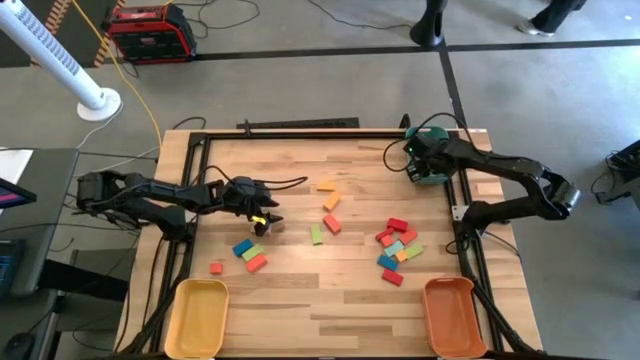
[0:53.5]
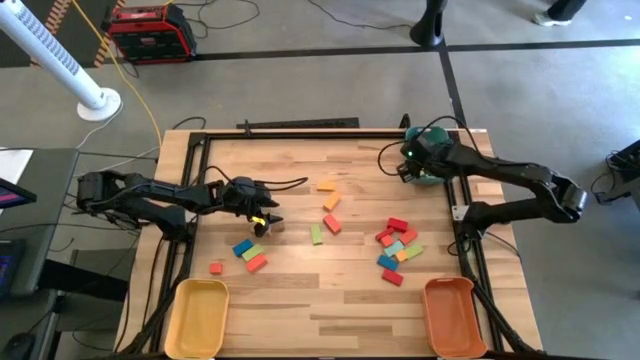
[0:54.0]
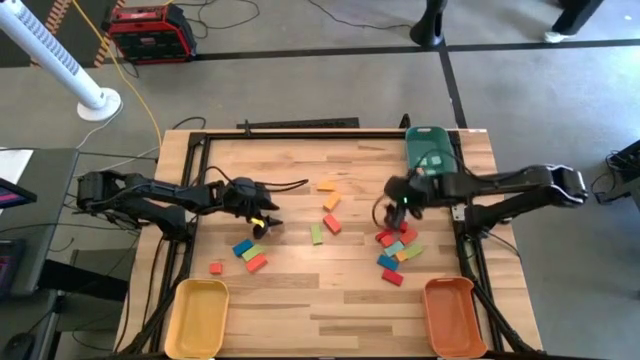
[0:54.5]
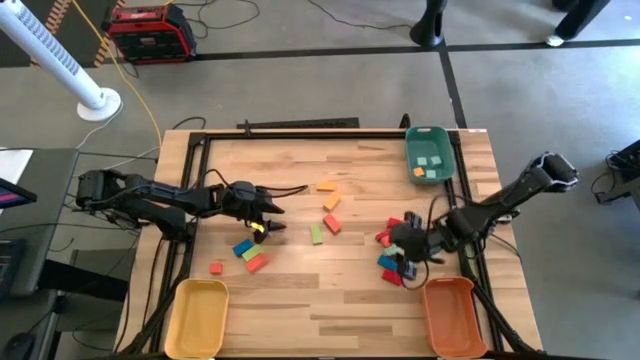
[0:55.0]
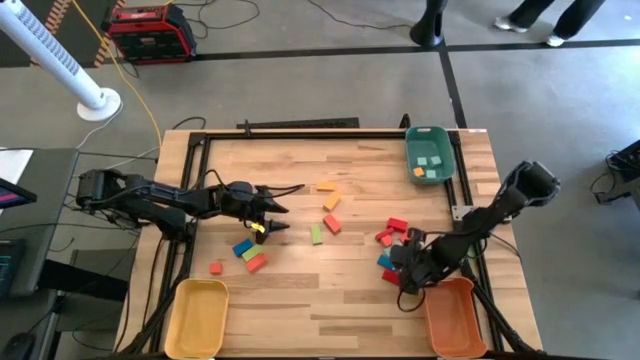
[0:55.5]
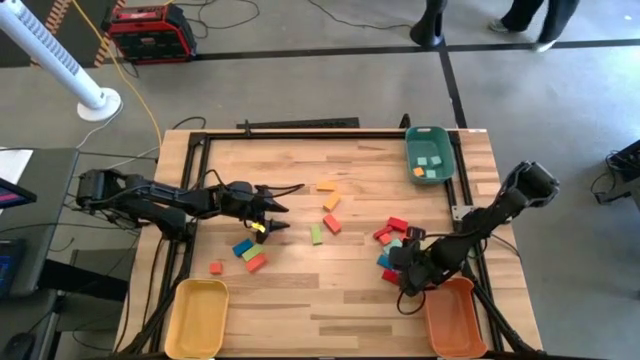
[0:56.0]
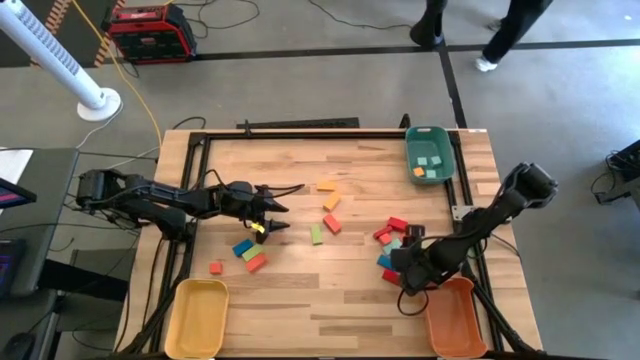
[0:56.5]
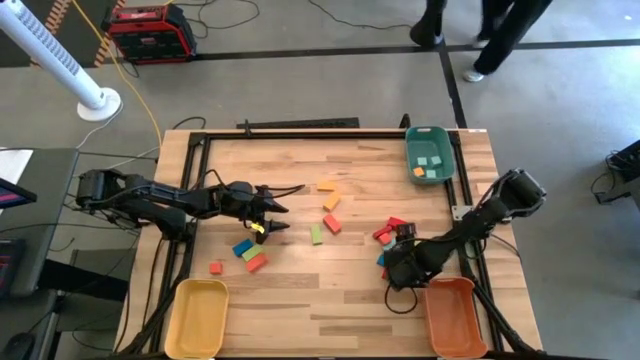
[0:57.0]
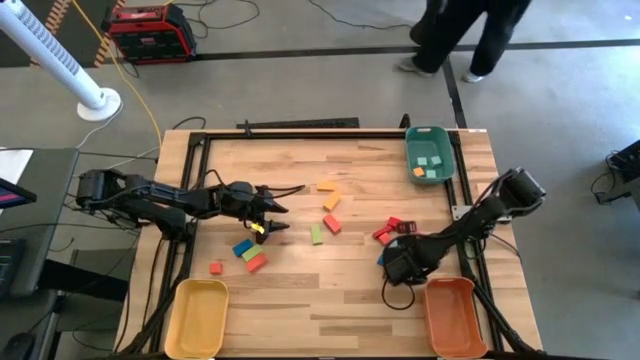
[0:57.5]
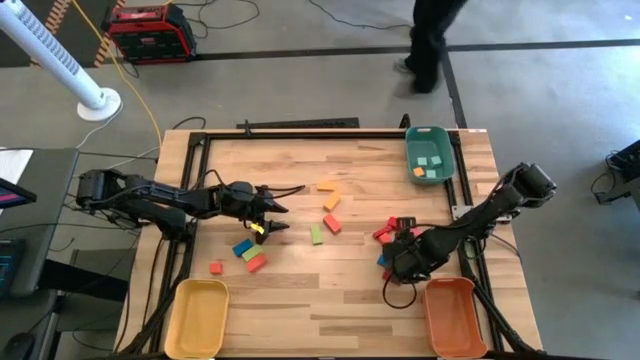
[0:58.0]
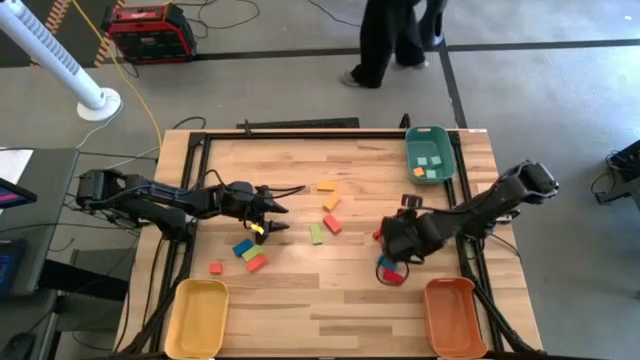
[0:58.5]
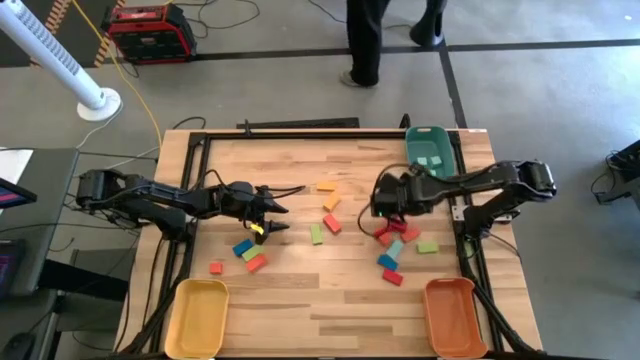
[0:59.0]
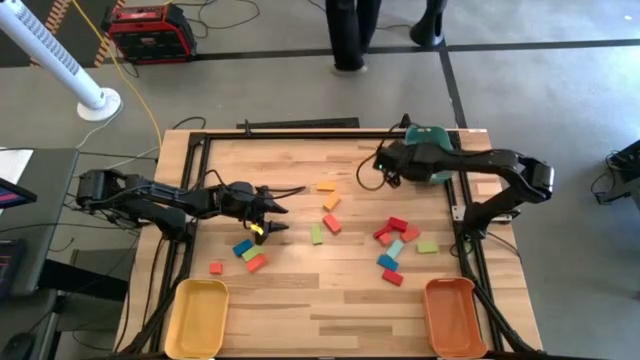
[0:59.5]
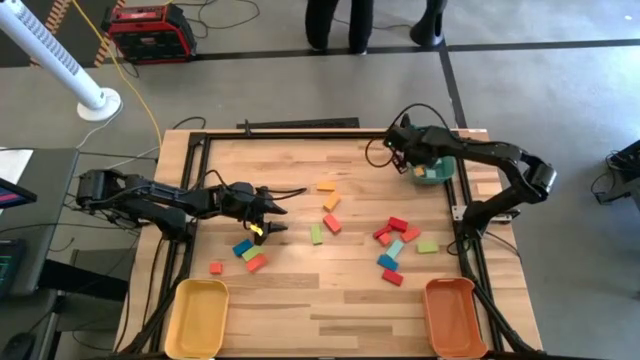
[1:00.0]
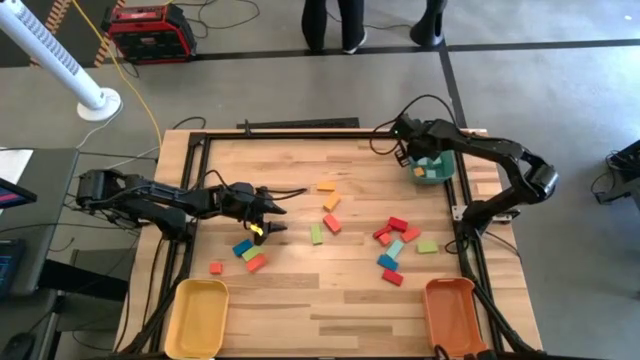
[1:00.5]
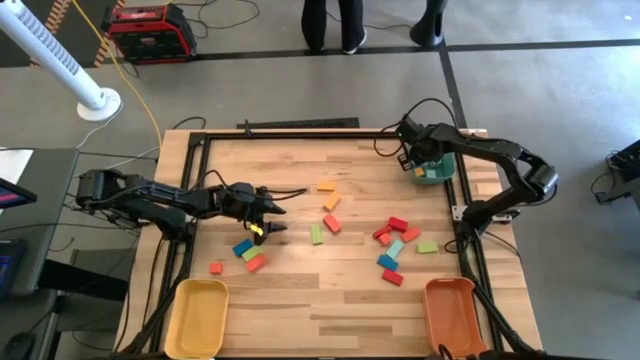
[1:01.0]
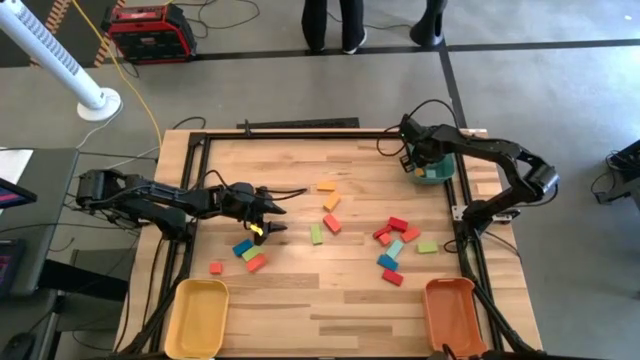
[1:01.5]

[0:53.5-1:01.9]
Task: Sort blocks by size
Put the yellow square block into the green bin

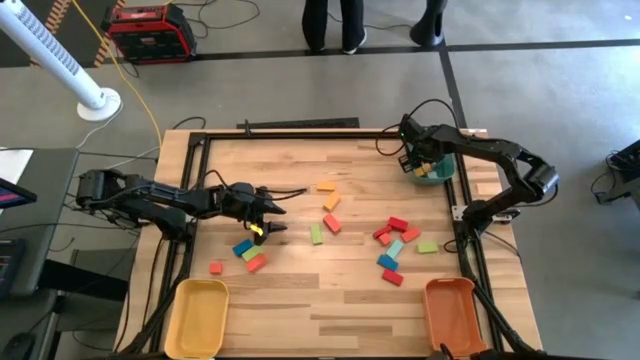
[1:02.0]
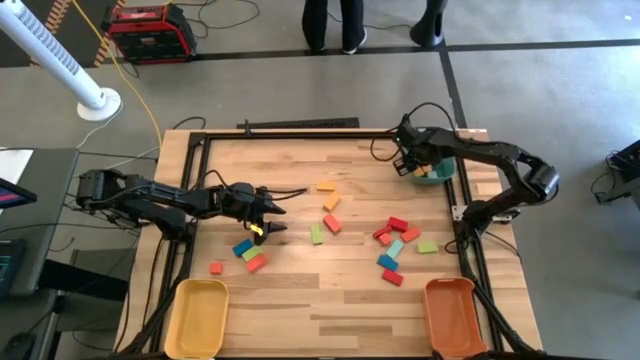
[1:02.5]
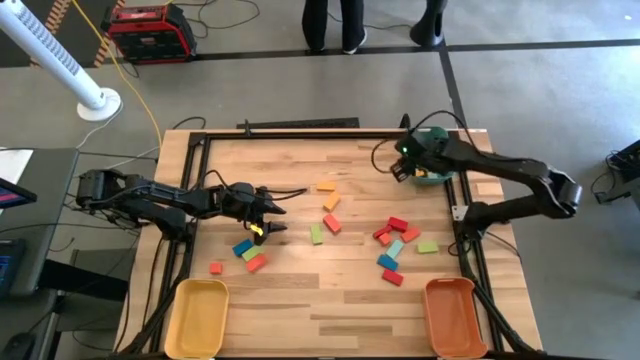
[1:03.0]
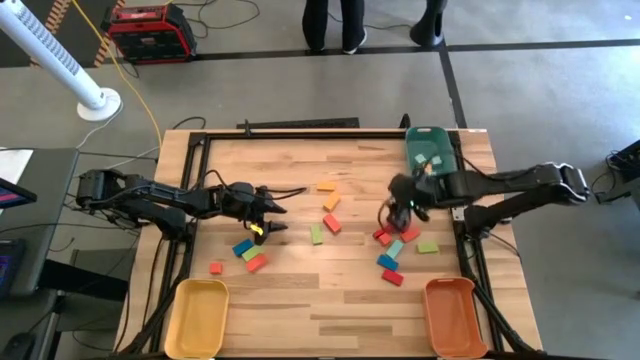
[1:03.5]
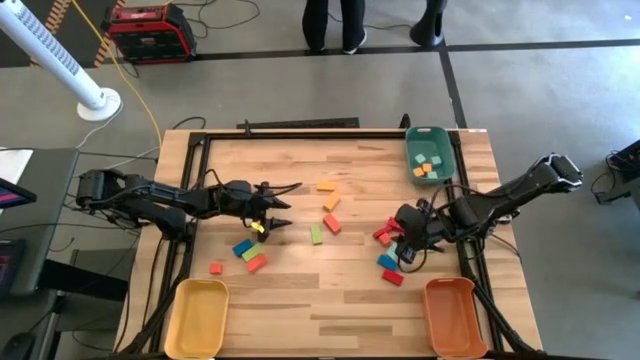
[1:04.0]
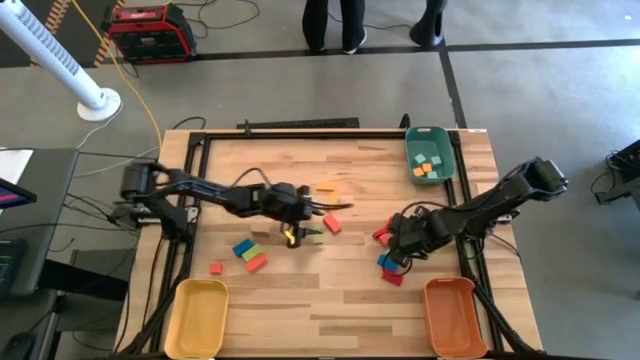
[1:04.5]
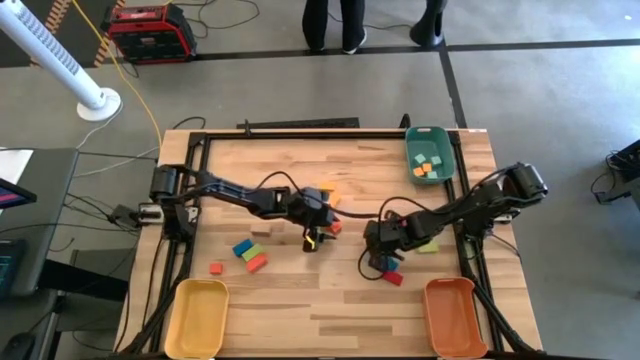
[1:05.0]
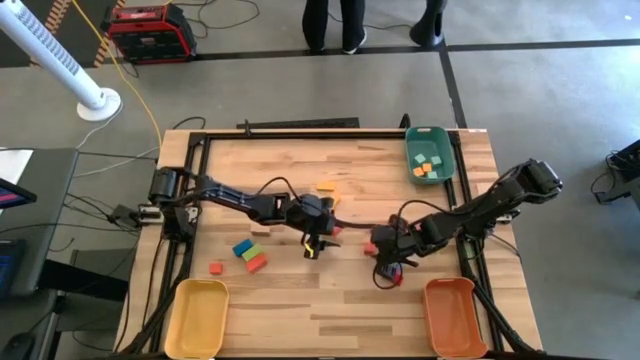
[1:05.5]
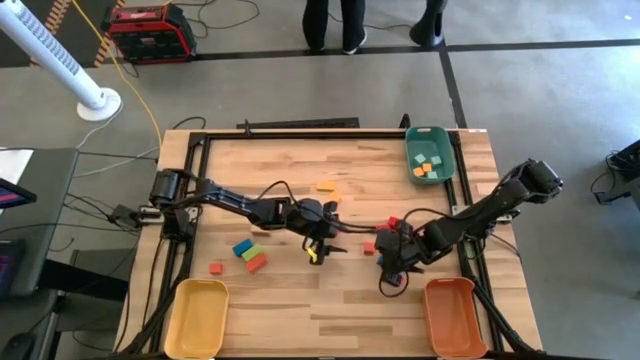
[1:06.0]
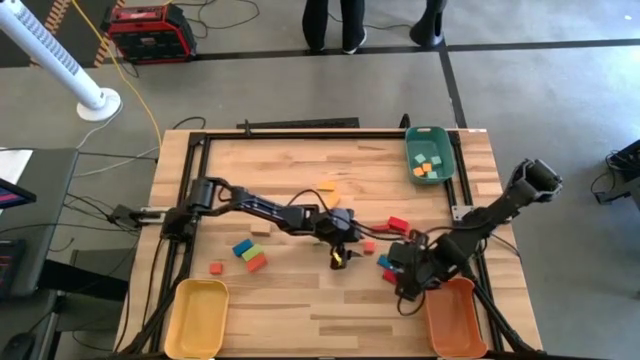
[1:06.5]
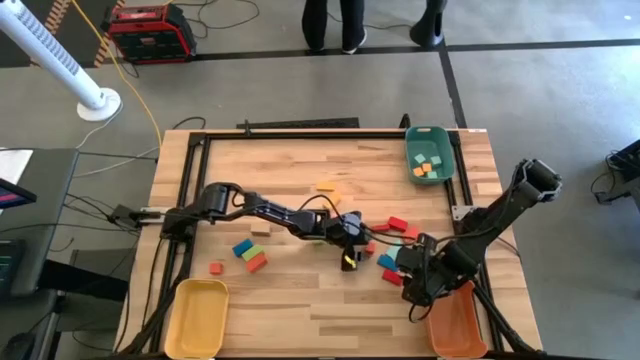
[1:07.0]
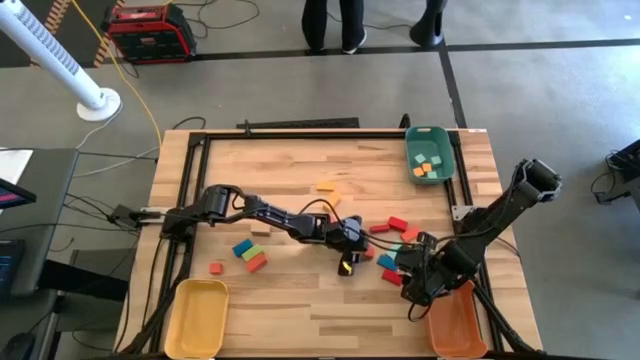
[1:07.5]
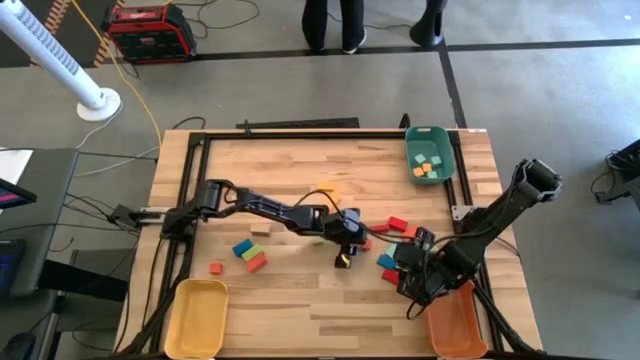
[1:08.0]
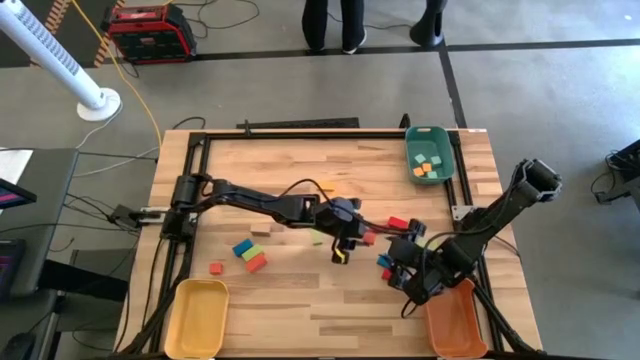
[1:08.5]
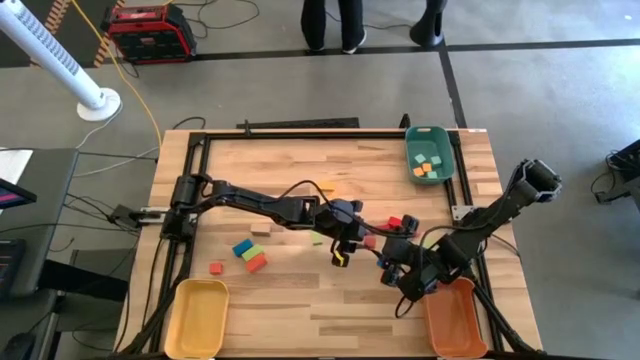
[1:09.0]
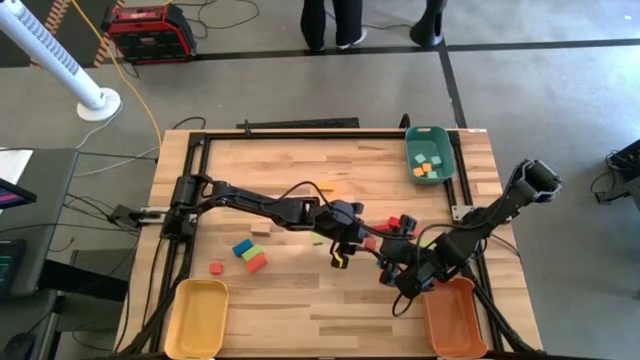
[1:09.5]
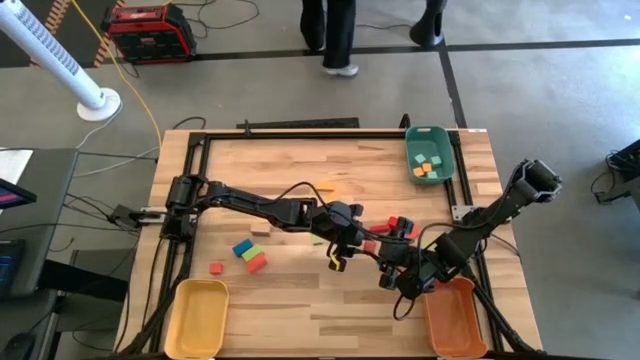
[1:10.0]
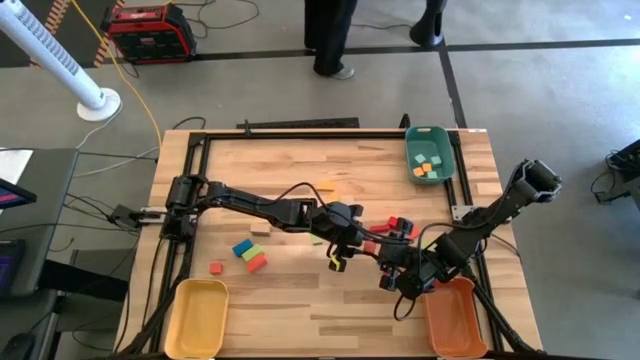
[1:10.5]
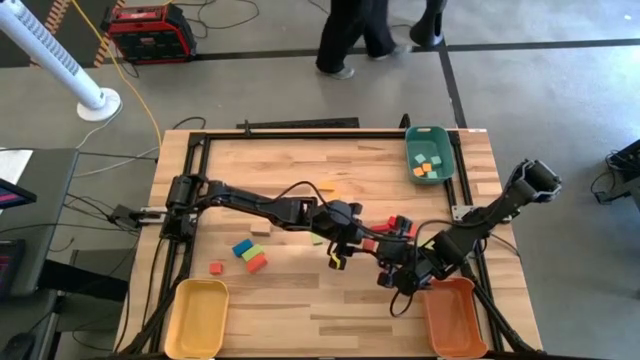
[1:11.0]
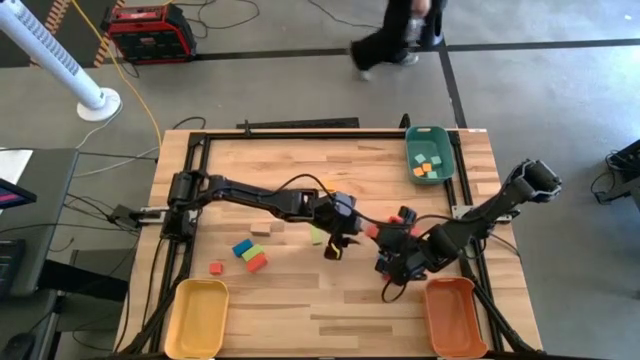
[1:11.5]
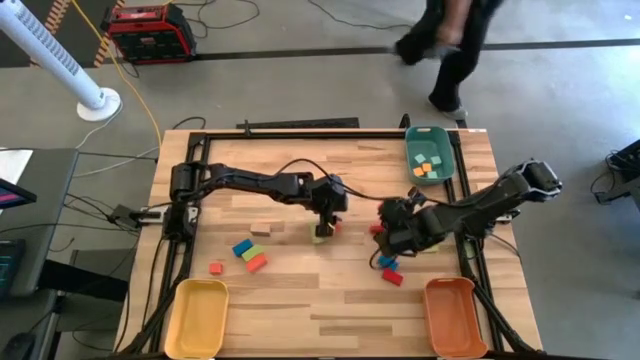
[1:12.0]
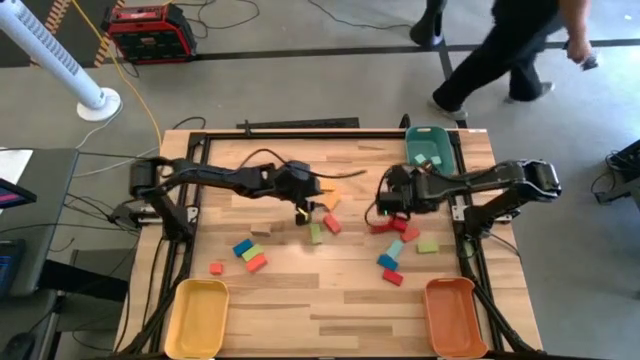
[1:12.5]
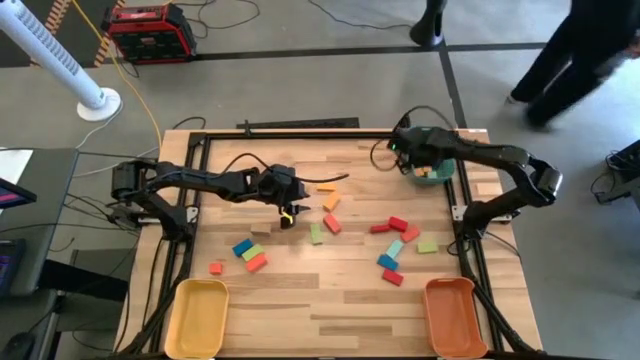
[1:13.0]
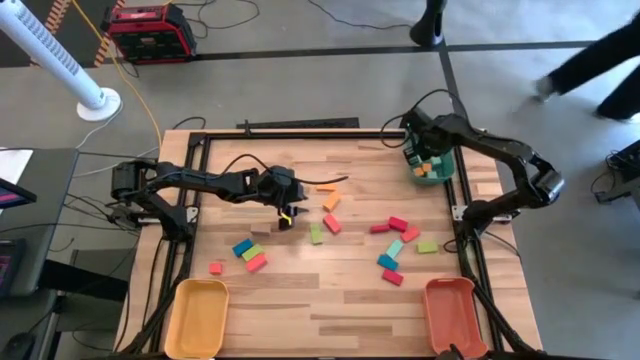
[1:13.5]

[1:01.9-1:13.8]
Put the orange square block into the green bin
